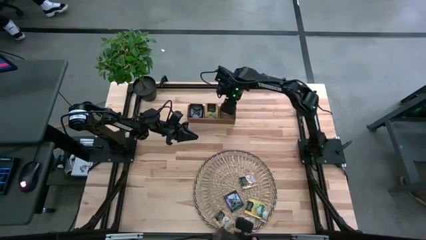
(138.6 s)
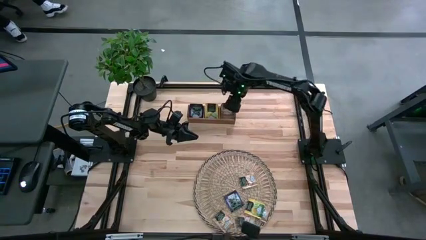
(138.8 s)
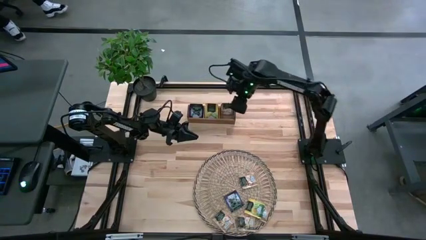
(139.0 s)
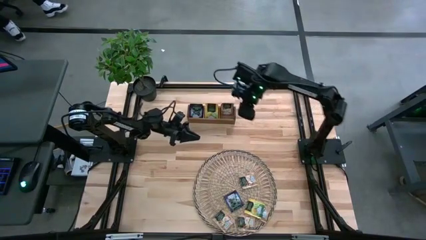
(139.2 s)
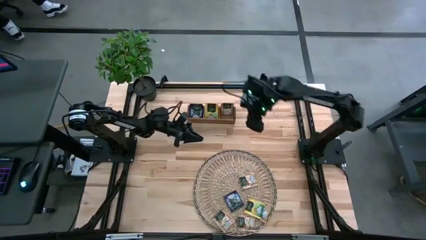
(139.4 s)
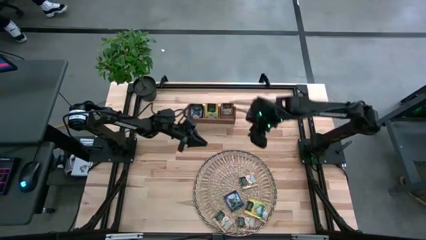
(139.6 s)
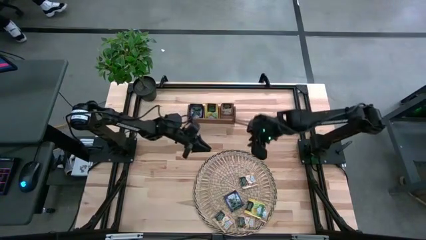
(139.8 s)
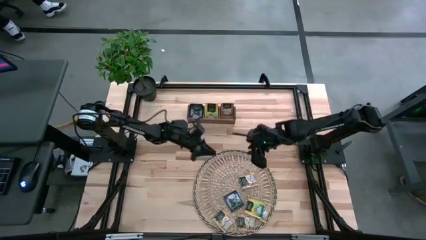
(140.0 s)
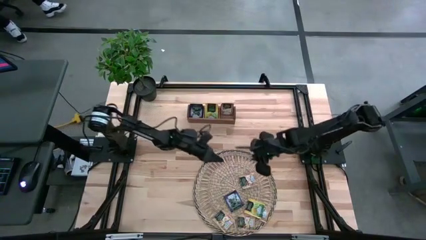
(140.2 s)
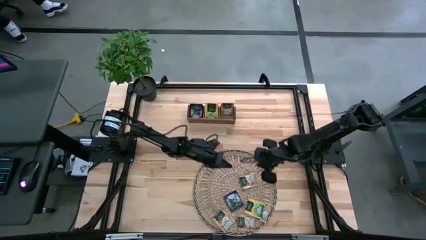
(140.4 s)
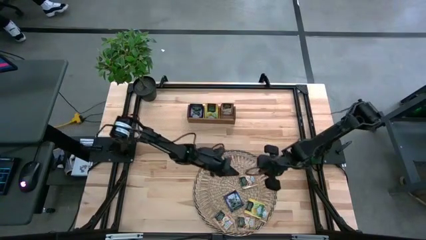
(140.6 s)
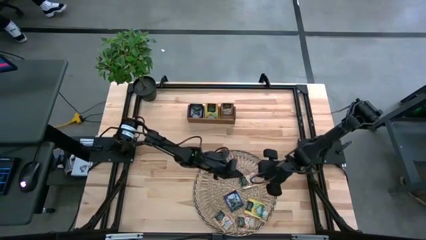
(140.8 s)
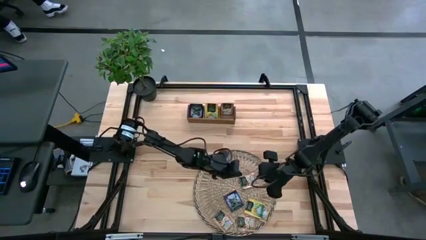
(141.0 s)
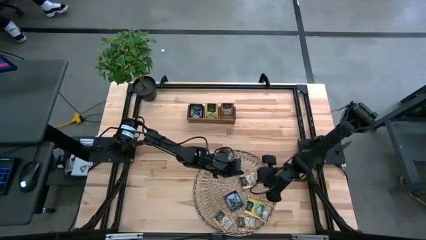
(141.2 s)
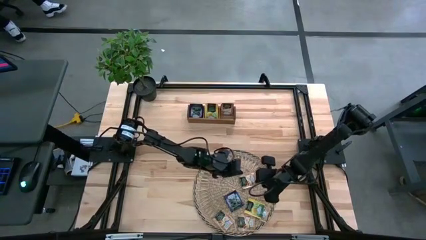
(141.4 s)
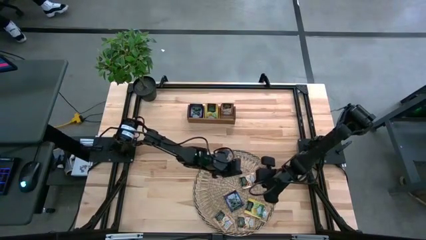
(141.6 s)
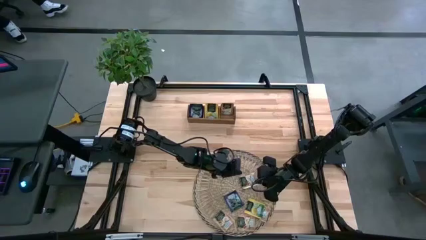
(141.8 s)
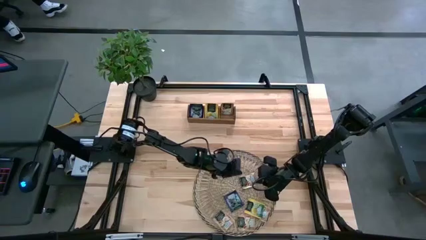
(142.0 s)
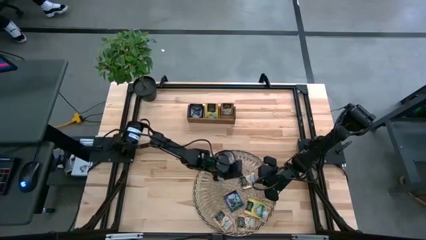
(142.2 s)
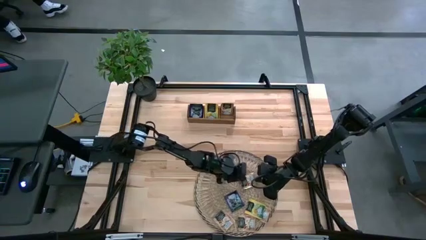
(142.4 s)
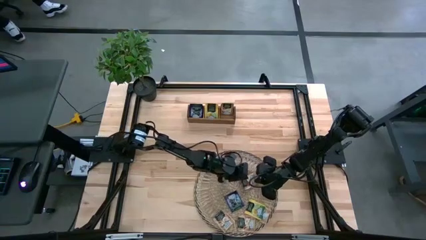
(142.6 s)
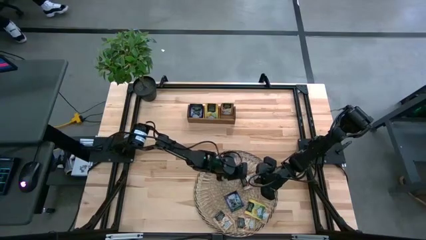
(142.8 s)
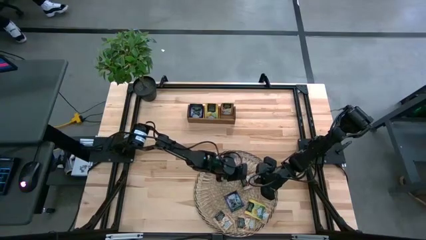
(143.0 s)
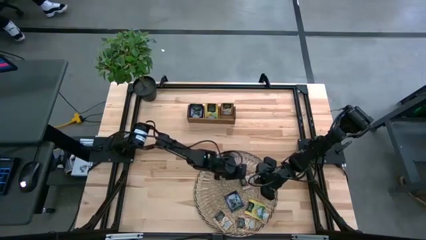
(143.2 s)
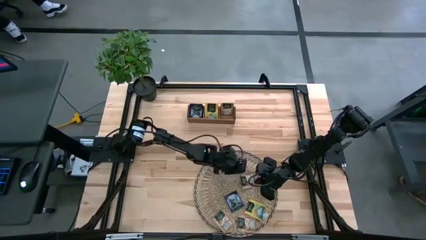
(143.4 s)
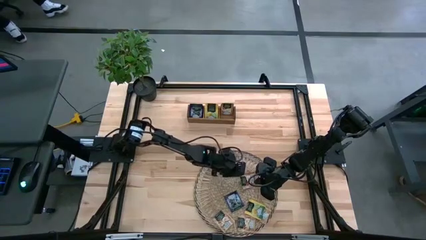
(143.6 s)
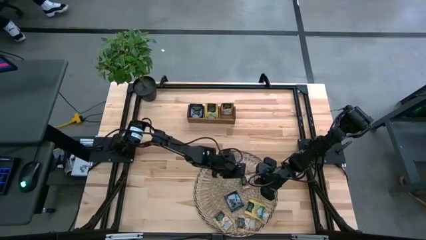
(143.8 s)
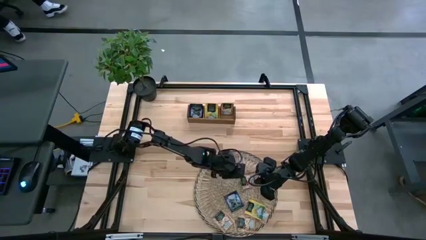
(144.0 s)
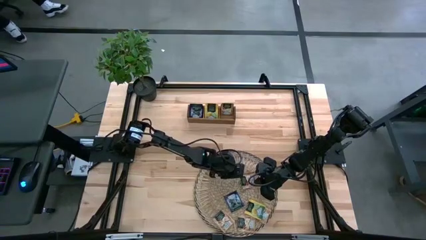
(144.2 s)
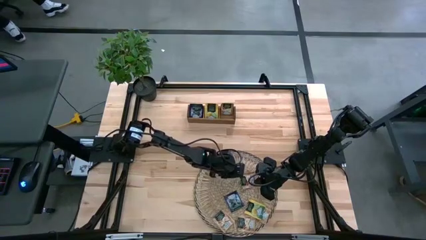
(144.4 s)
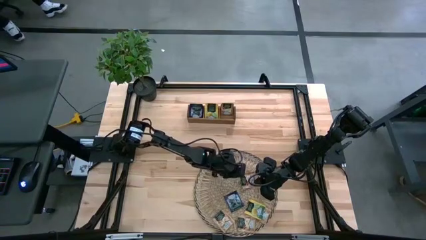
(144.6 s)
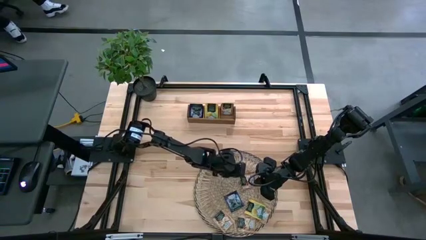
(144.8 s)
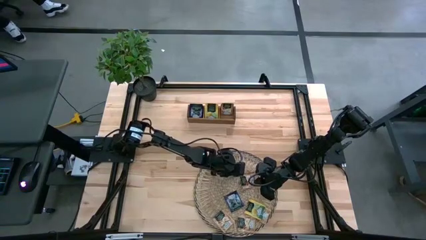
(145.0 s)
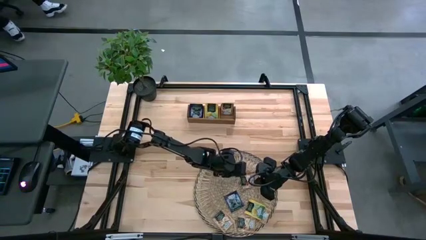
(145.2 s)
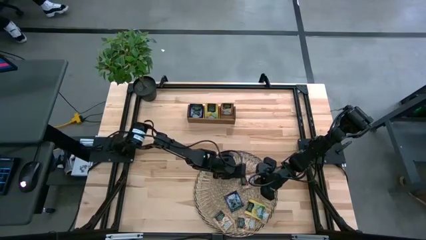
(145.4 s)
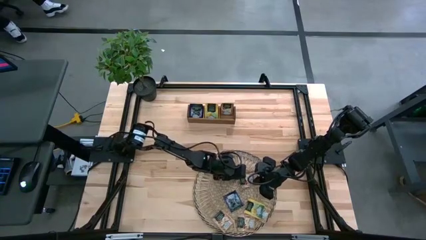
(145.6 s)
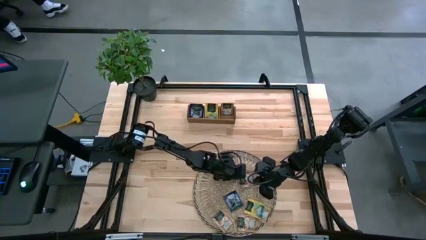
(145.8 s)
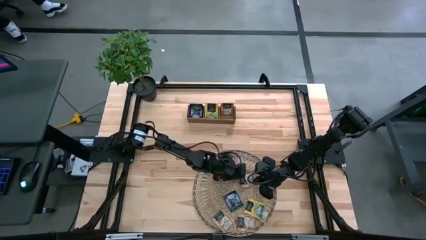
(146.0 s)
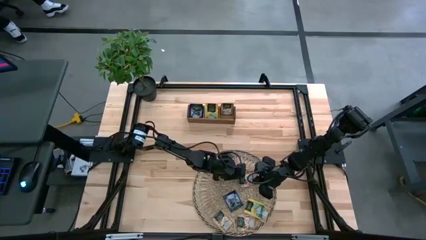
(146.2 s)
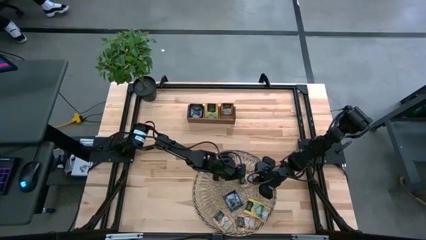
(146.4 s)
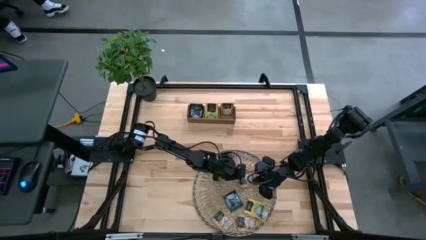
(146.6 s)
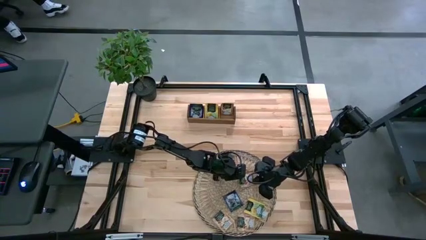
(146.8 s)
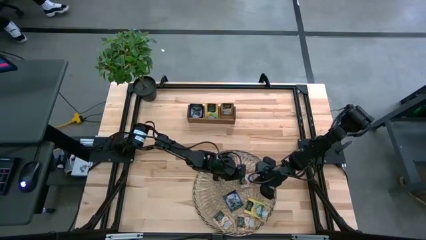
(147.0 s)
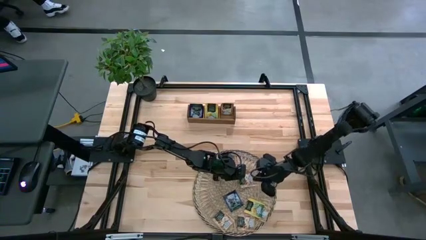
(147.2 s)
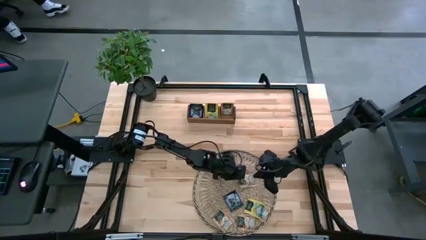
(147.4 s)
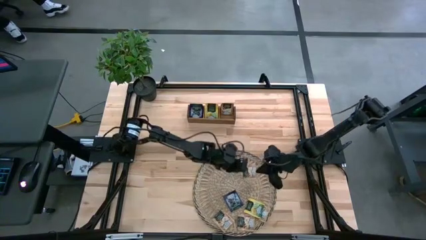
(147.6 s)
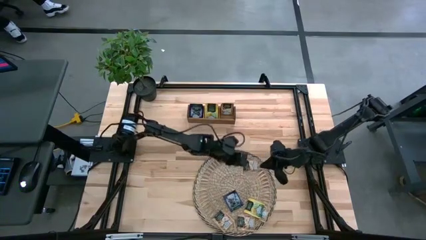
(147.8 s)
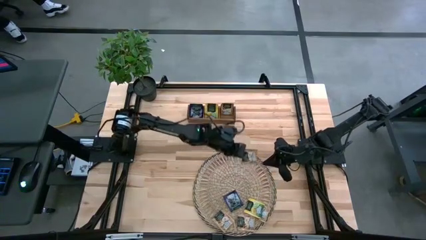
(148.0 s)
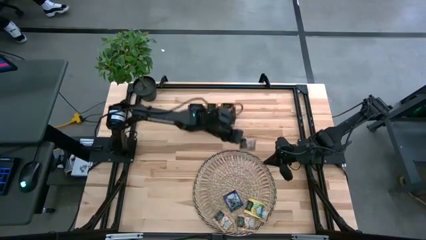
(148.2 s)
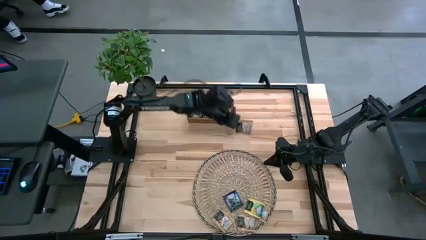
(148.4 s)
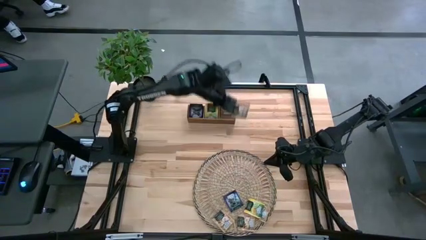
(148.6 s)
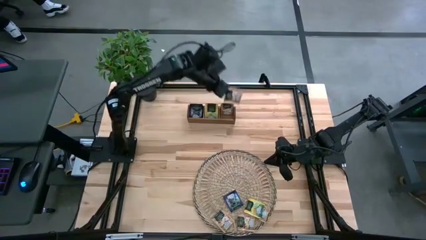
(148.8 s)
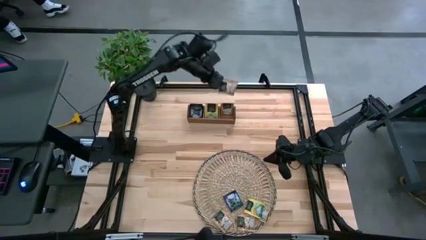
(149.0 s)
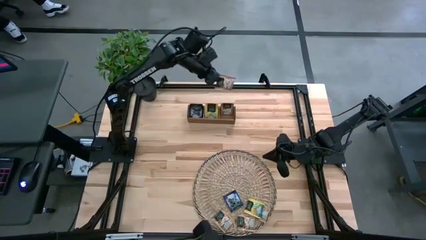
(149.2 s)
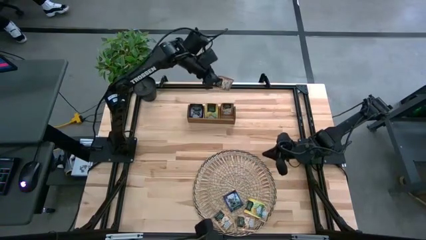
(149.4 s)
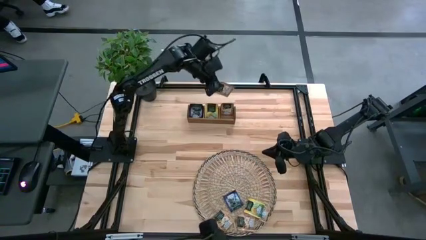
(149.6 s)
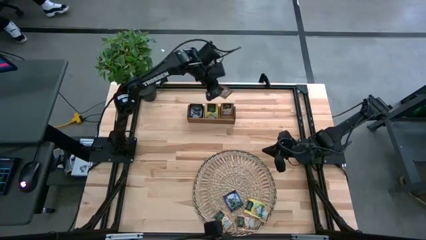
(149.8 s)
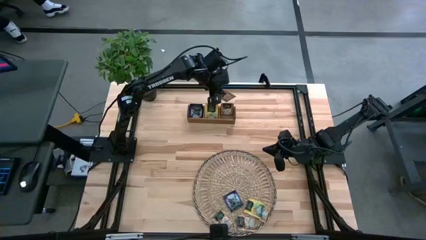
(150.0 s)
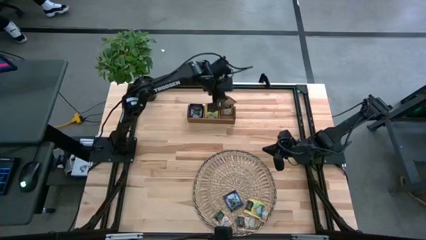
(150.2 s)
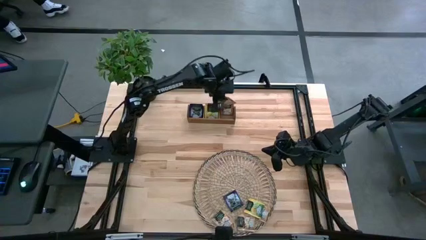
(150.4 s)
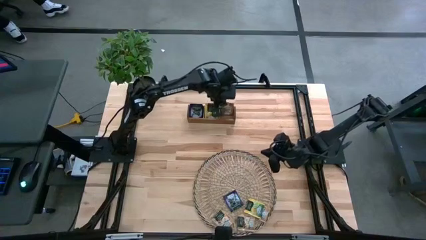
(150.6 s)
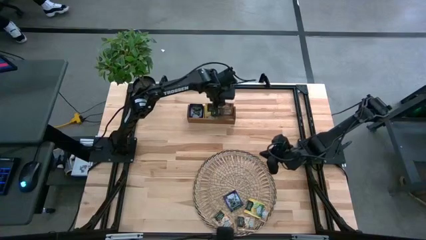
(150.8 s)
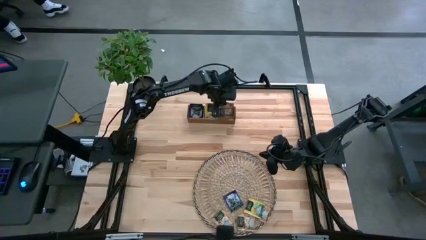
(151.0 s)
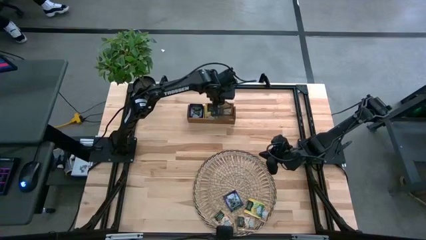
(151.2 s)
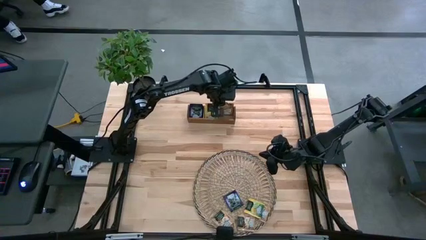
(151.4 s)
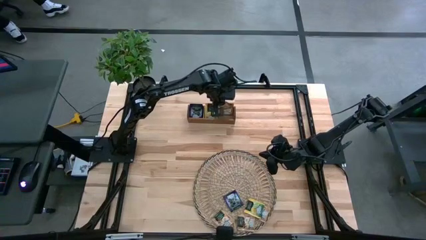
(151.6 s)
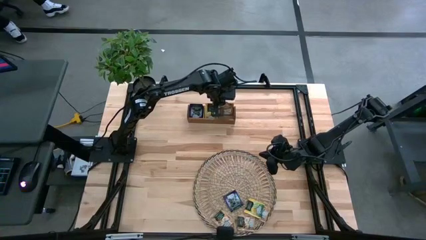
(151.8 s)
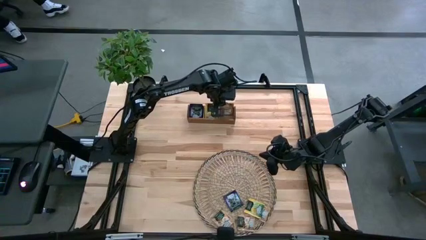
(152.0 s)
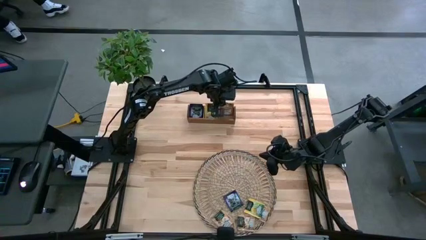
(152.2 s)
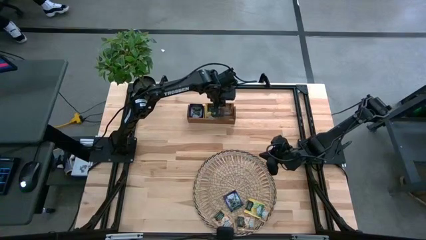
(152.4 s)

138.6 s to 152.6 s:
Task: Pick & Place Tea
Put the brown tea bag in the right section of the wooden organizer

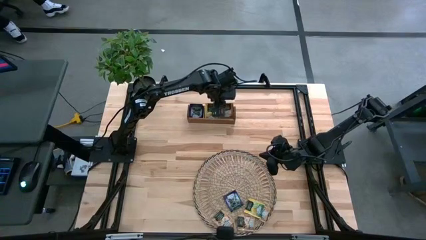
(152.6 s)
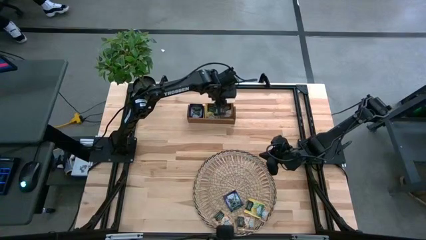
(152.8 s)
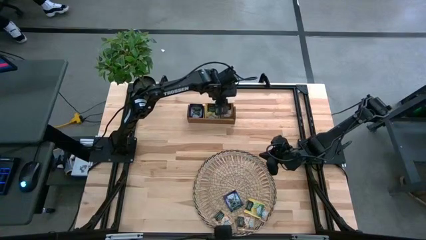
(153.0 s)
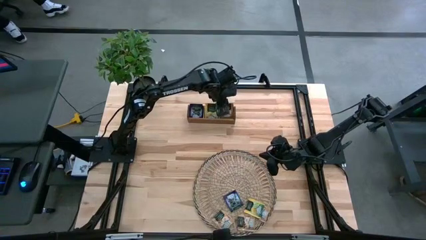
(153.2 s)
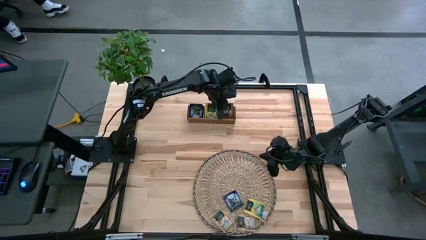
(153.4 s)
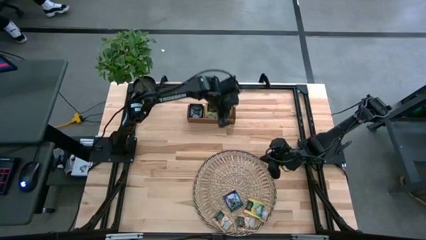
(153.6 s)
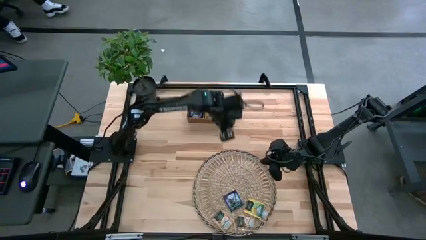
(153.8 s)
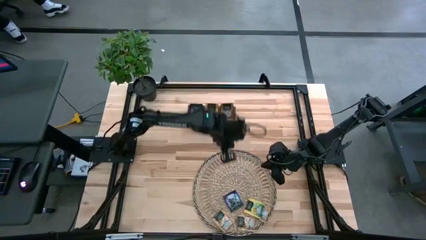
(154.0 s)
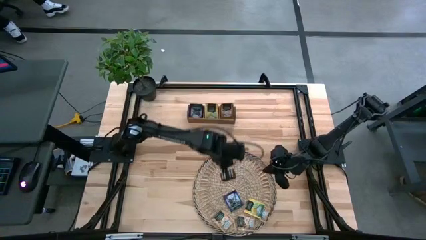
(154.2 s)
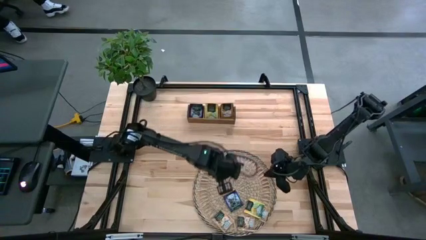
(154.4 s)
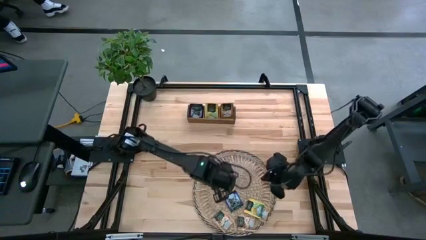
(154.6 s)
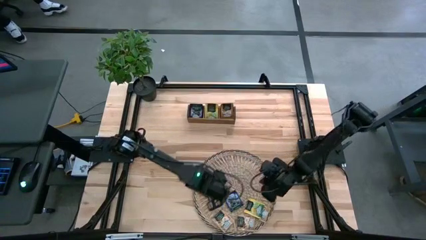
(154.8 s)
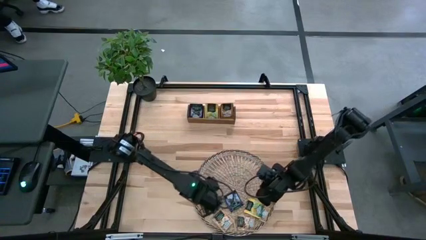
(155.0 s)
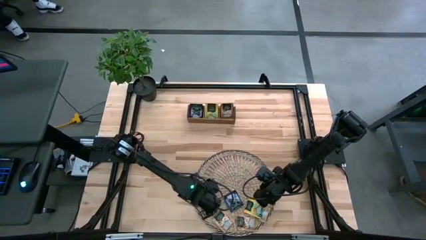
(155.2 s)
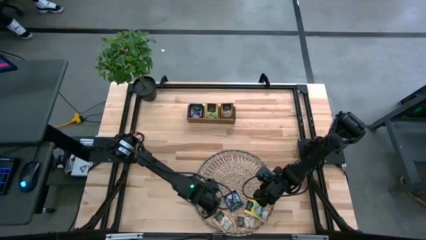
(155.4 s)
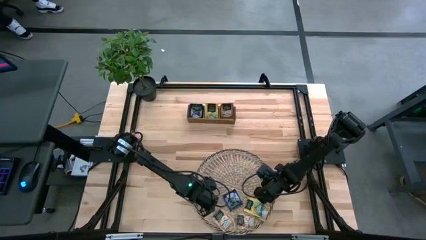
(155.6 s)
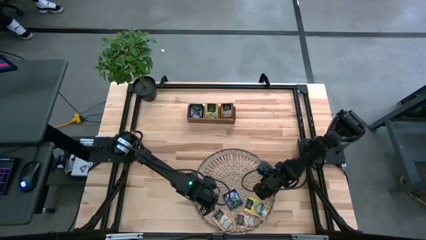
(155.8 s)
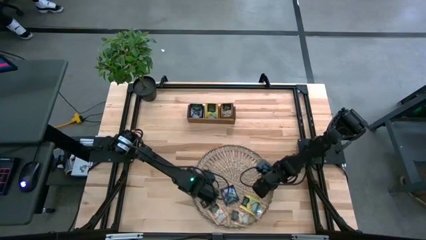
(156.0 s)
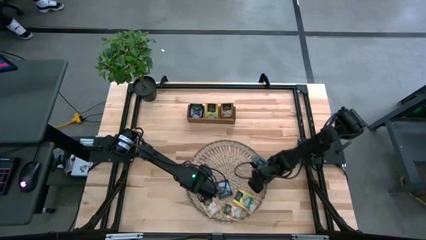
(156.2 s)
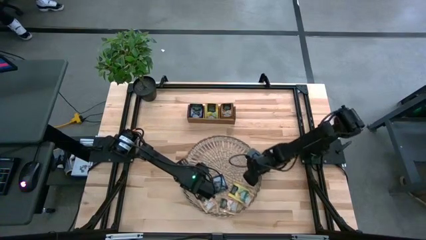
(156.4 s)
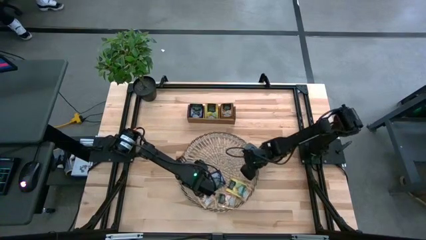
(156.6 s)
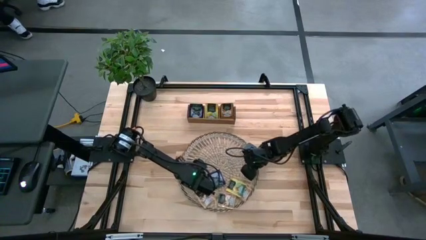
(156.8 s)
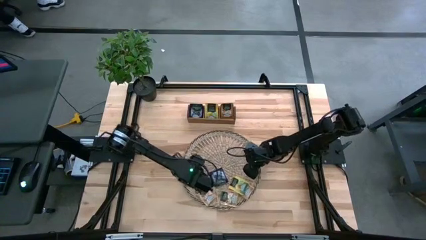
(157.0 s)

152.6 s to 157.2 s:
Move the brown mat to the middle of the table
